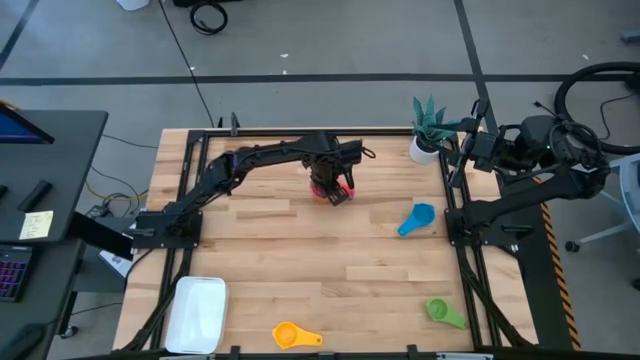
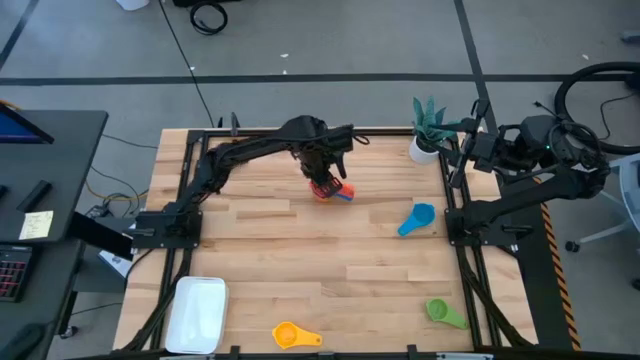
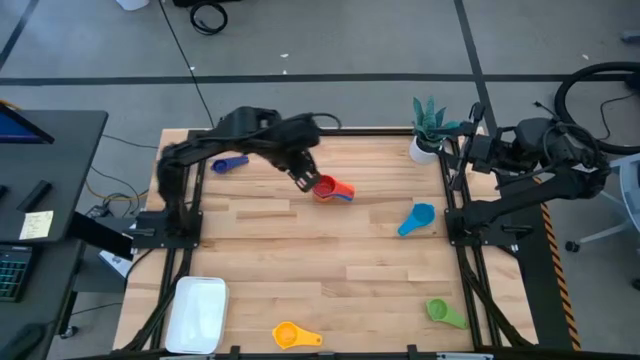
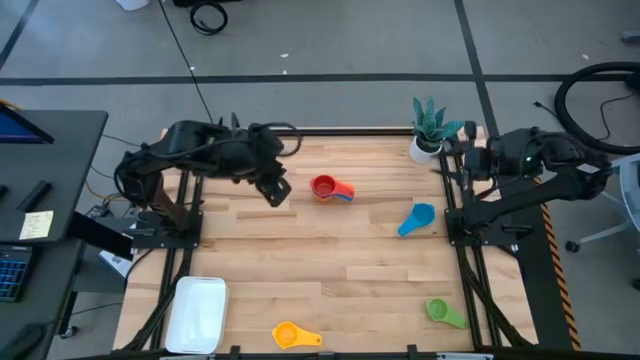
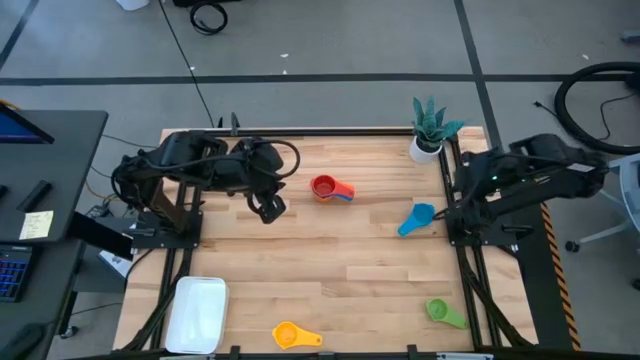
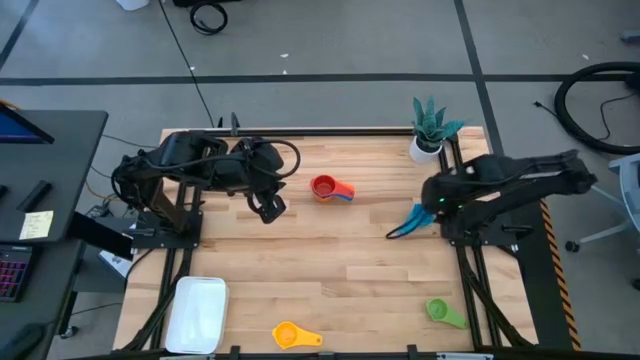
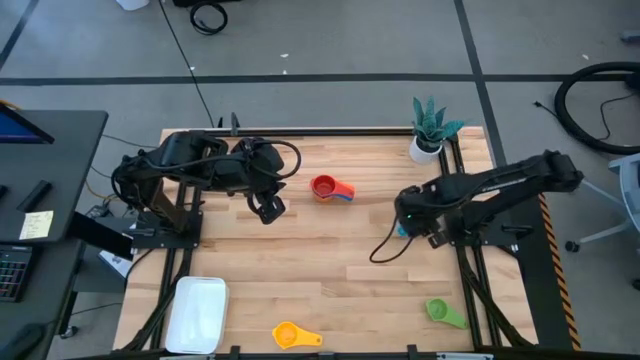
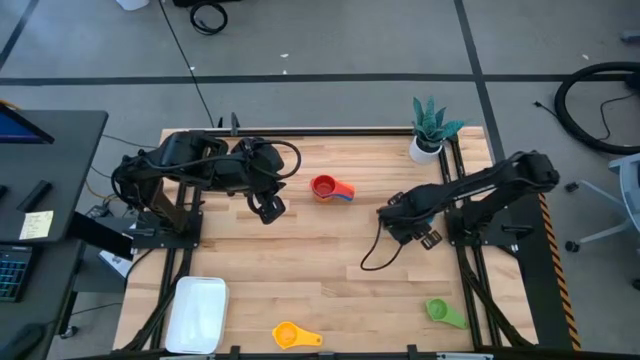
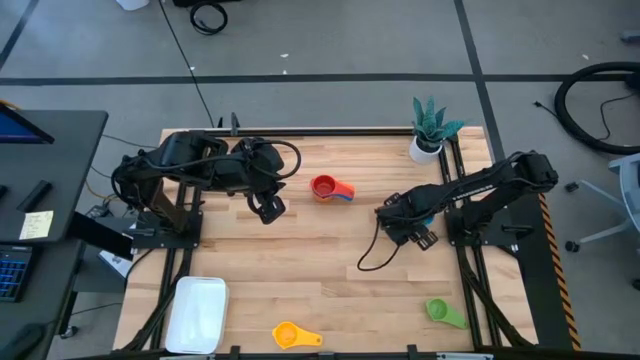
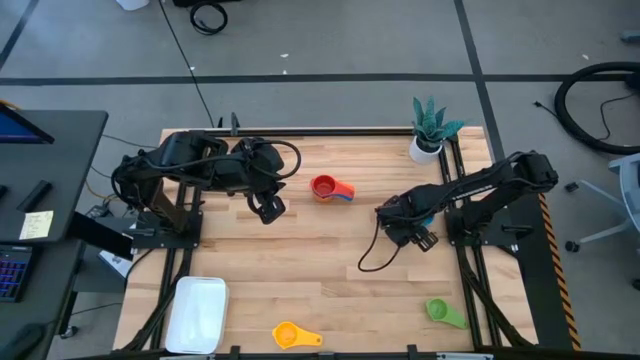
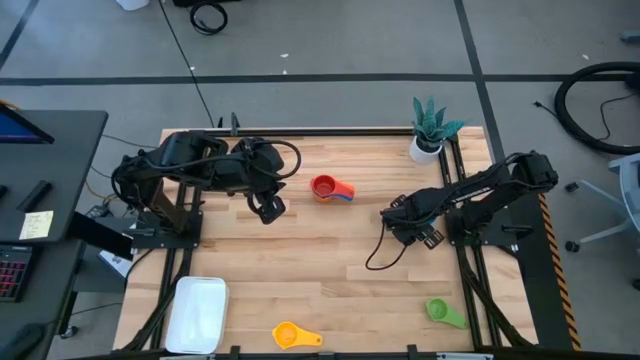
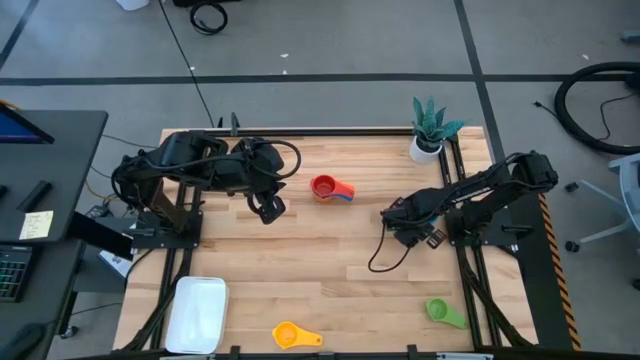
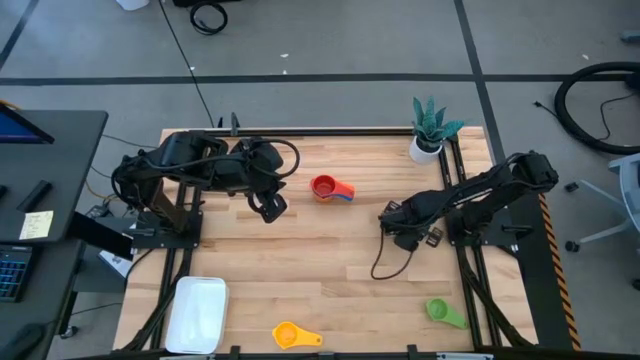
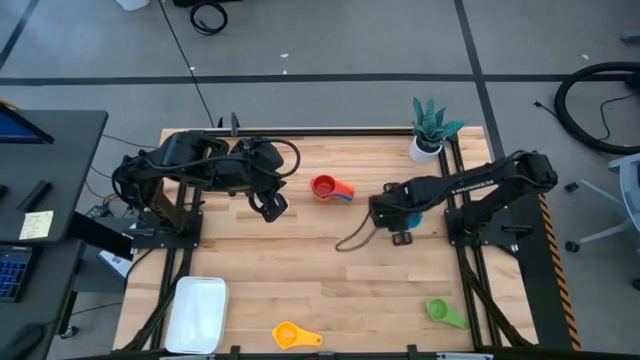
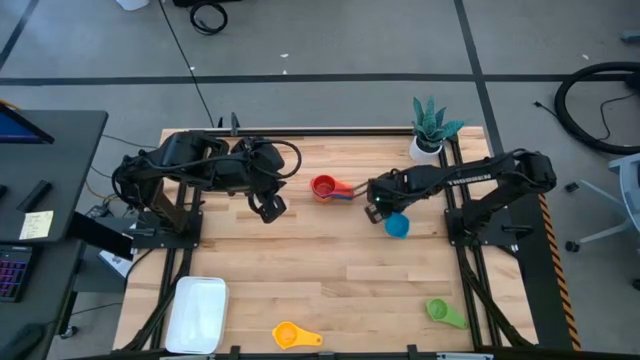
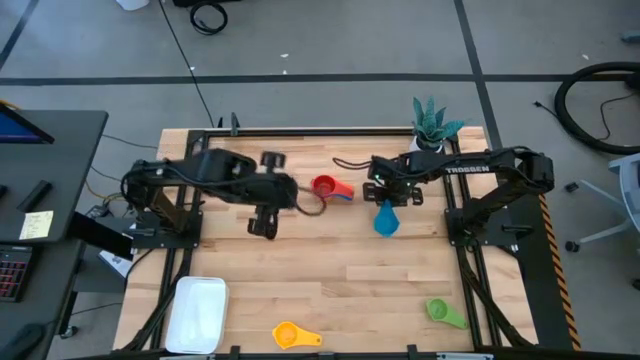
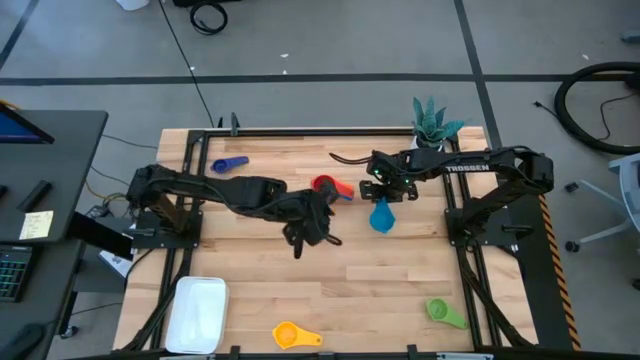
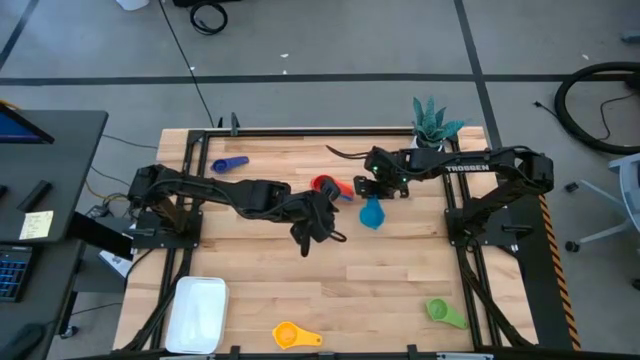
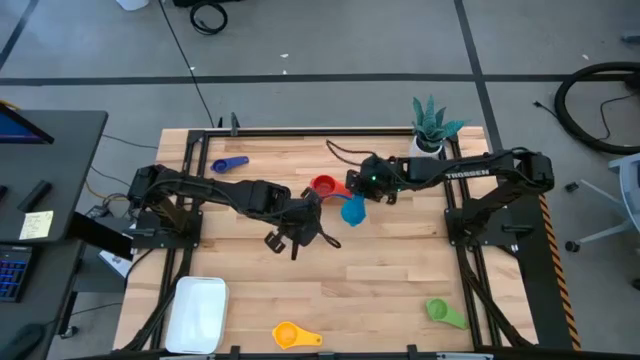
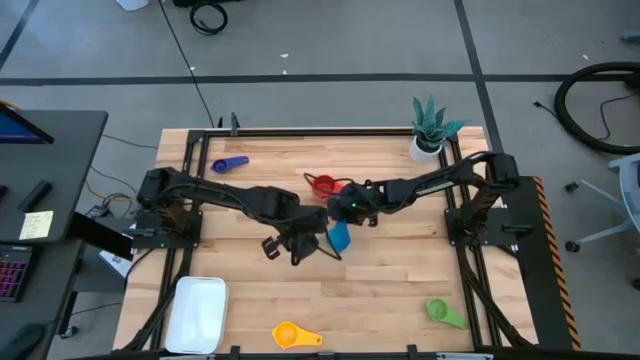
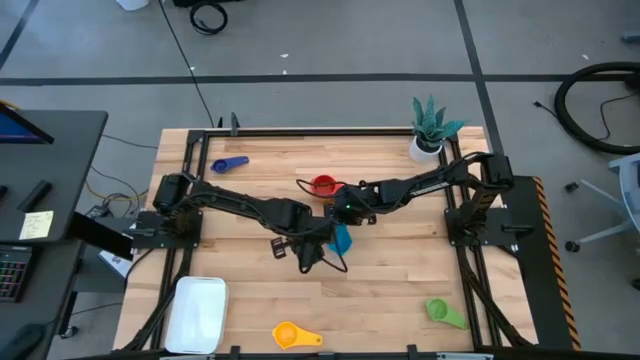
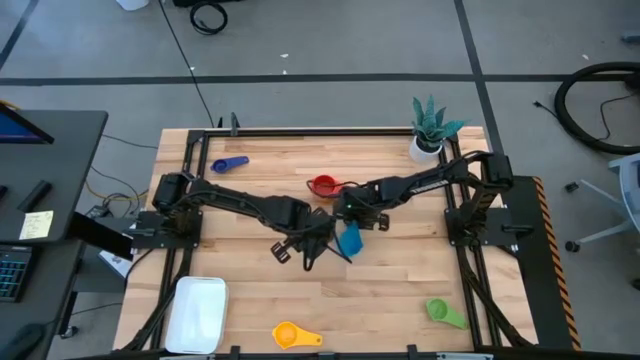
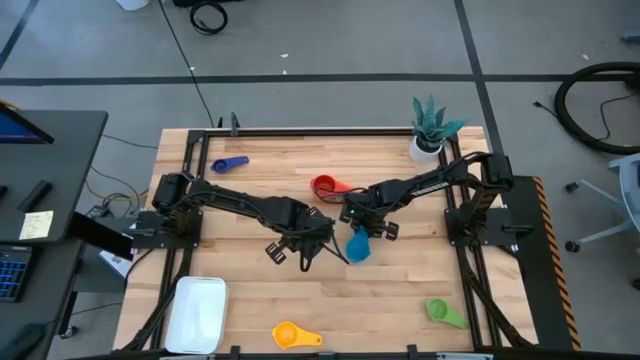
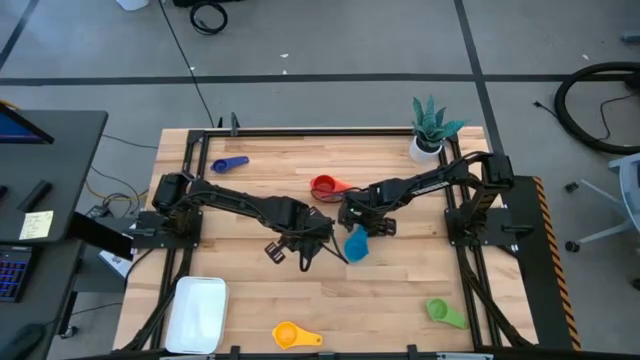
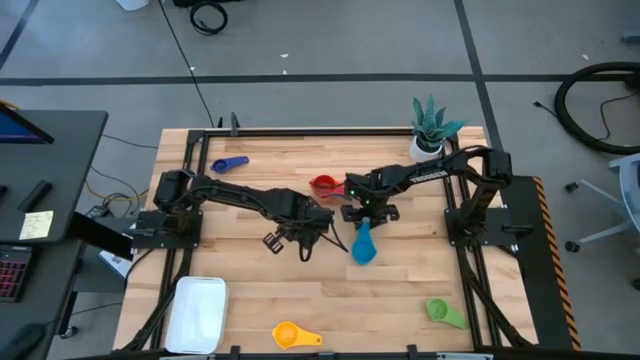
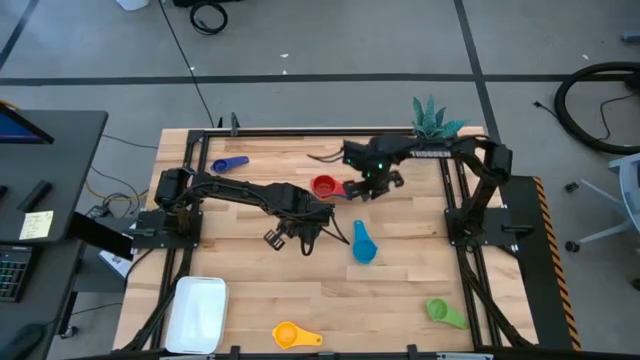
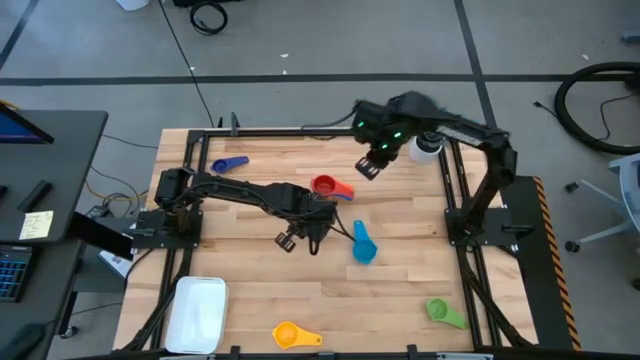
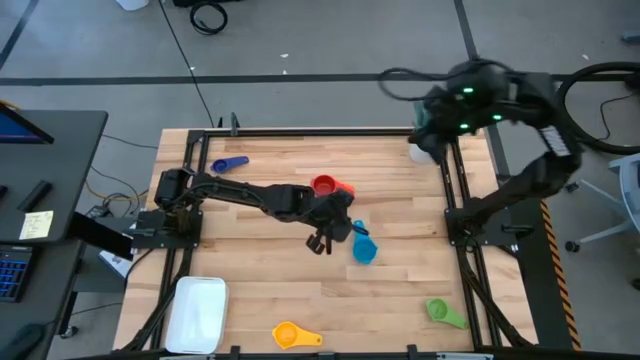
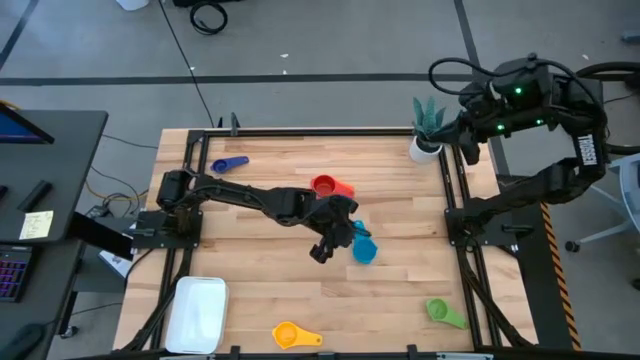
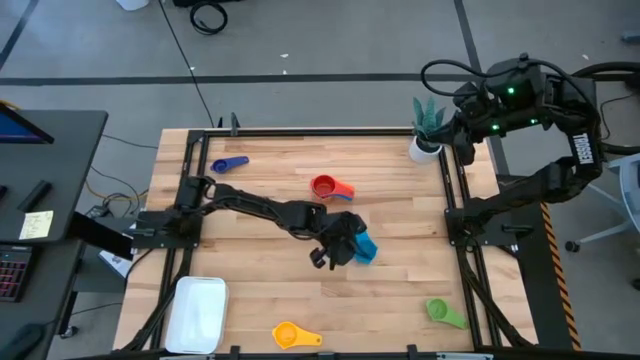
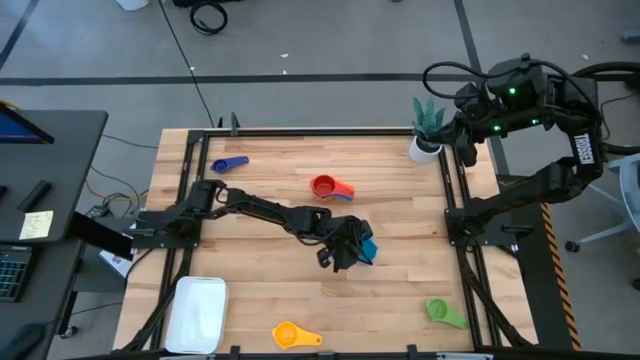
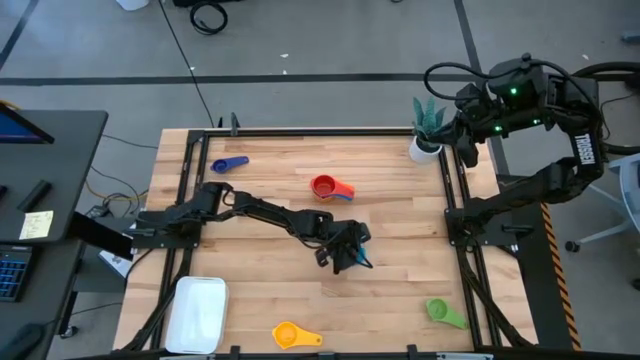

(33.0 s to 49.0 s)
Task: Nest measuring cups in basket
Stack the light blue measuring cup on top of the red measuring cup

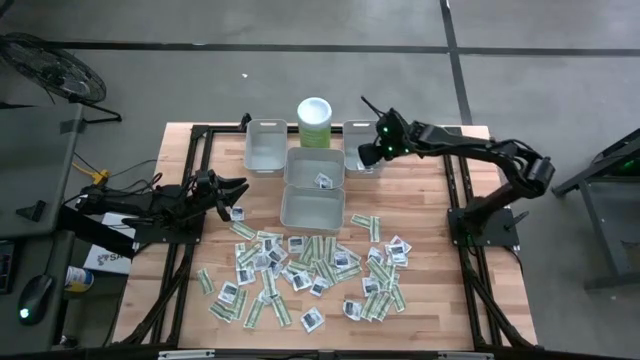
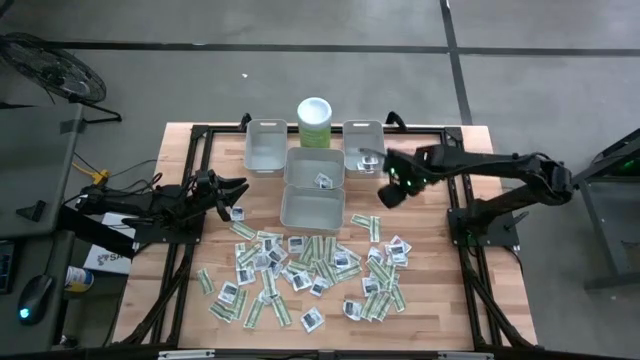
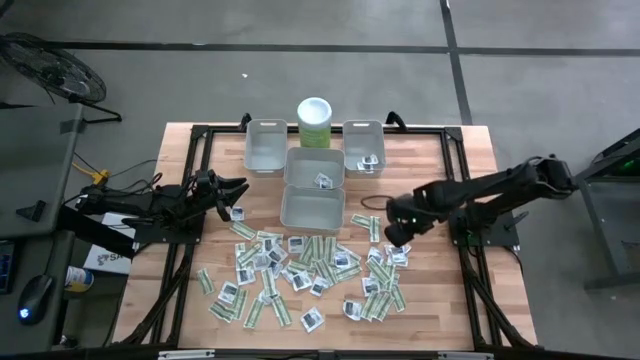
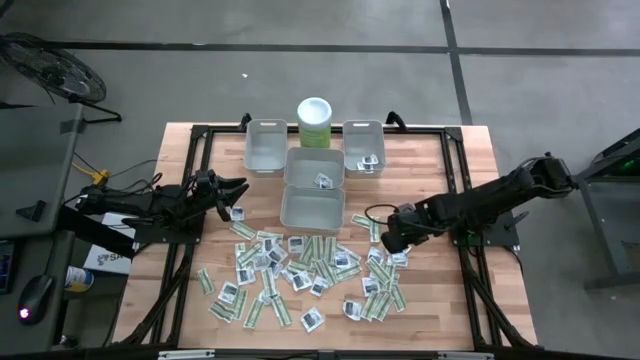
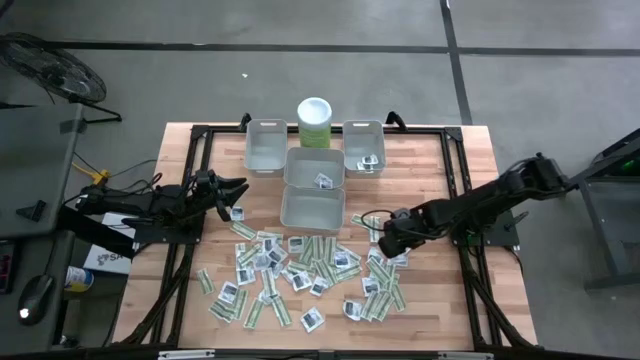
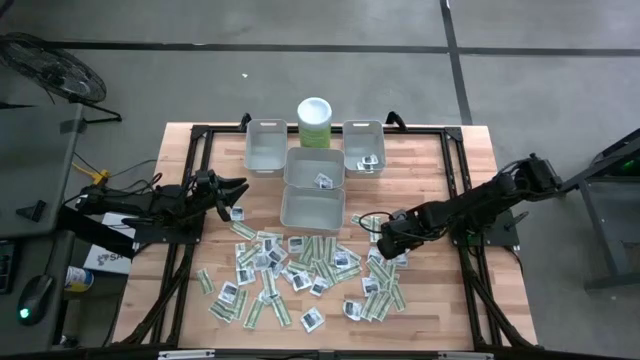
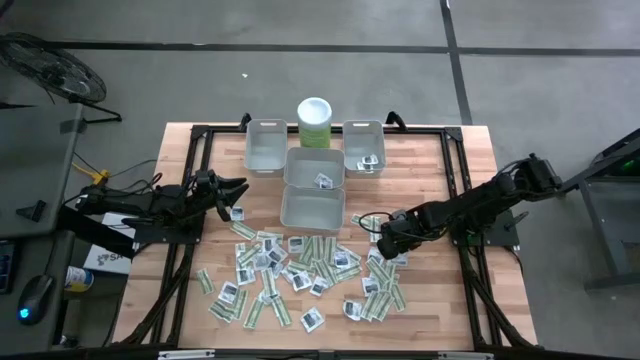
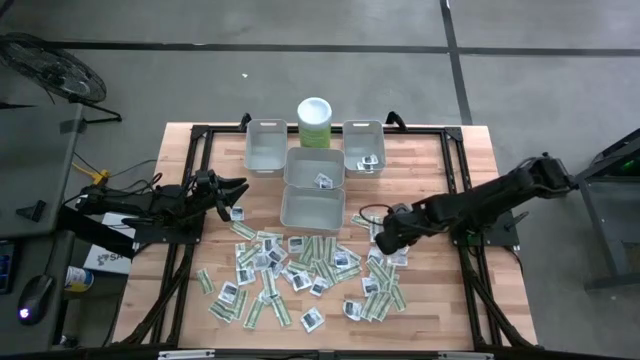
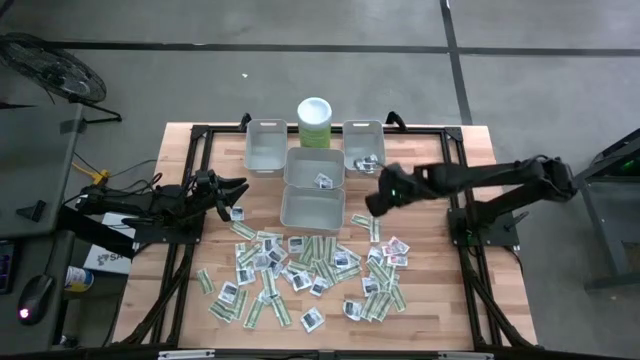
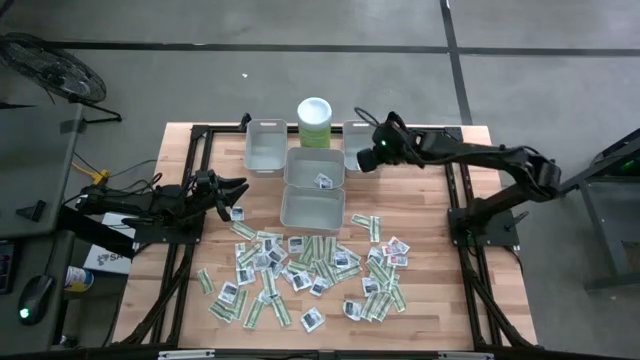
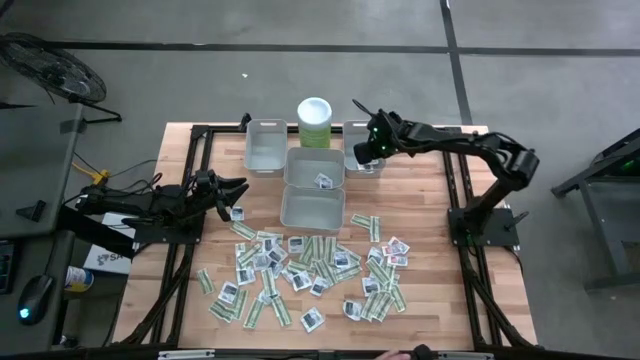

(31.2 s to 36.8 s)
Task: Pick & Place First Aid Supplies
Put the towelette pack into the right bin
